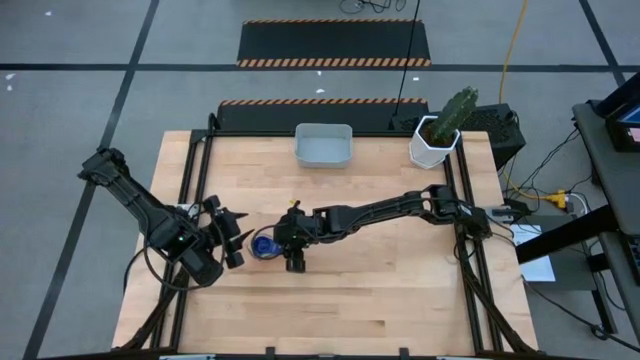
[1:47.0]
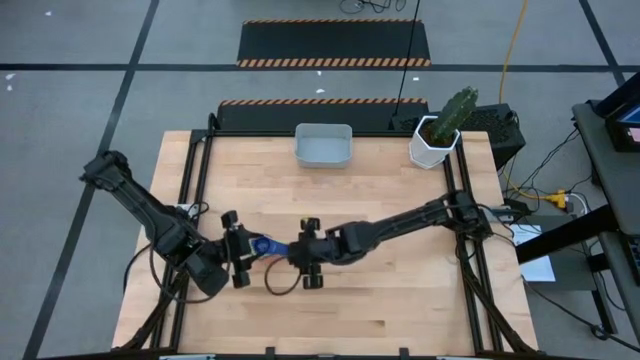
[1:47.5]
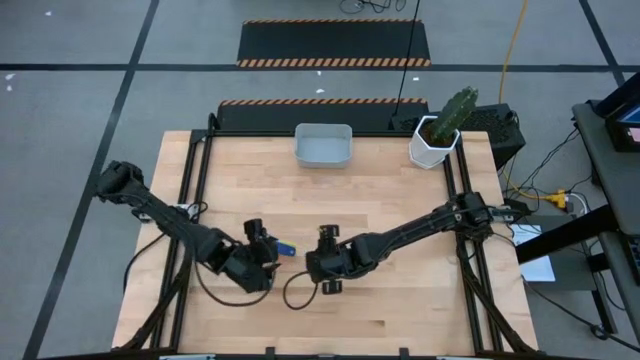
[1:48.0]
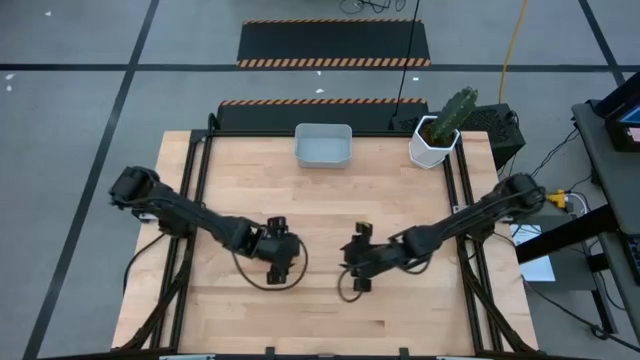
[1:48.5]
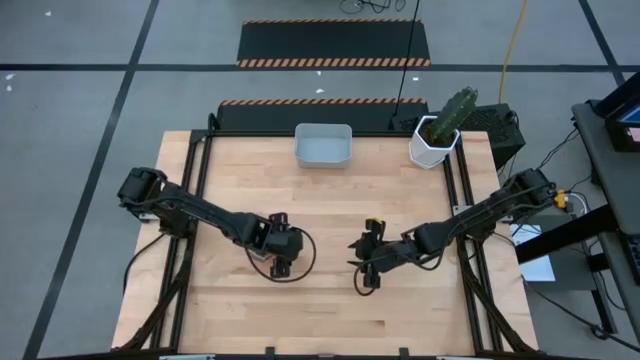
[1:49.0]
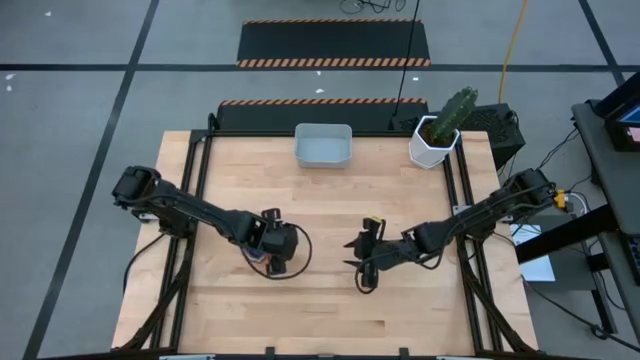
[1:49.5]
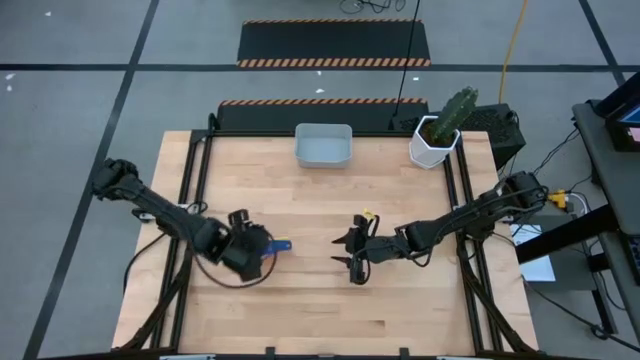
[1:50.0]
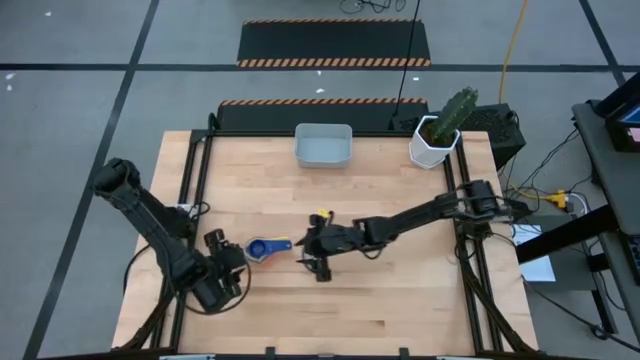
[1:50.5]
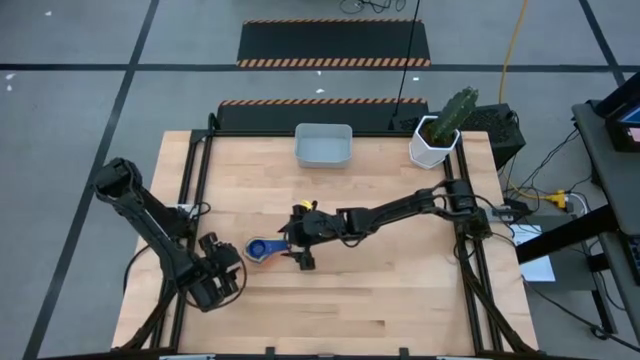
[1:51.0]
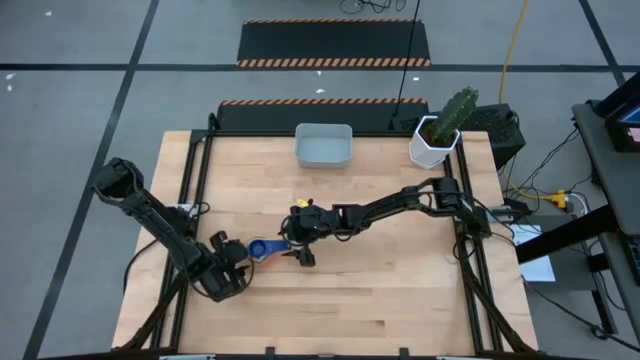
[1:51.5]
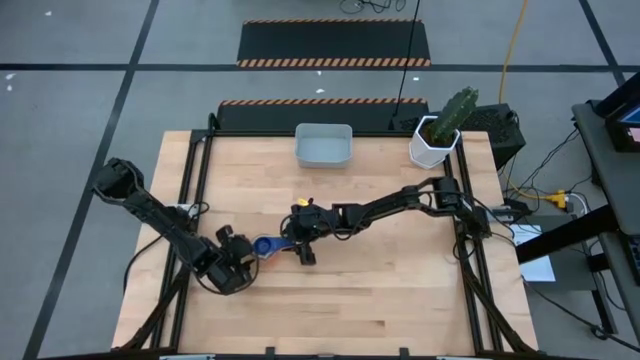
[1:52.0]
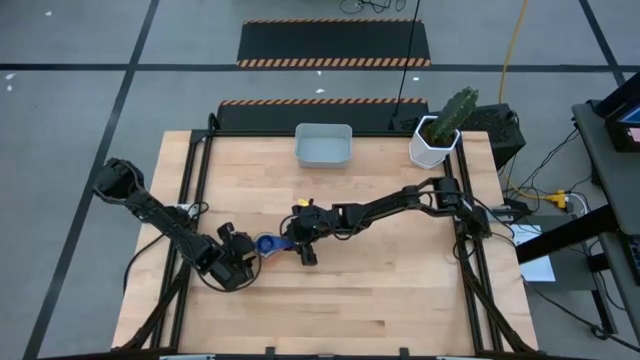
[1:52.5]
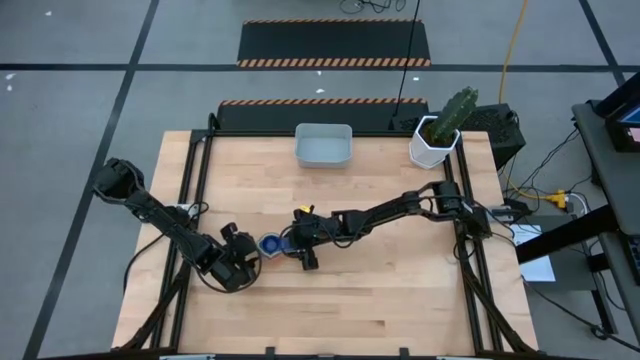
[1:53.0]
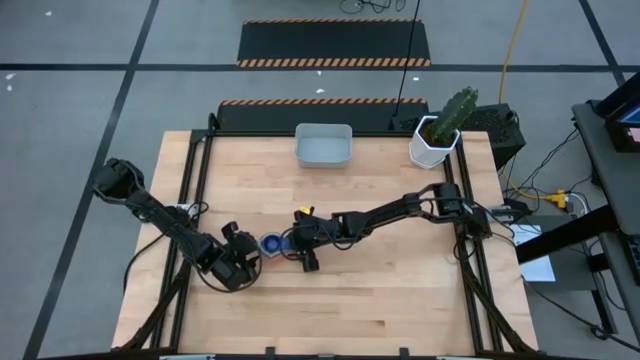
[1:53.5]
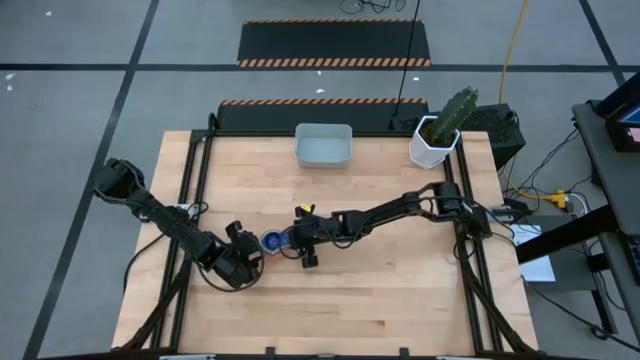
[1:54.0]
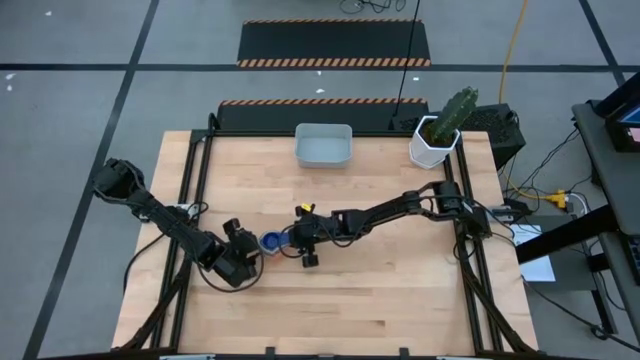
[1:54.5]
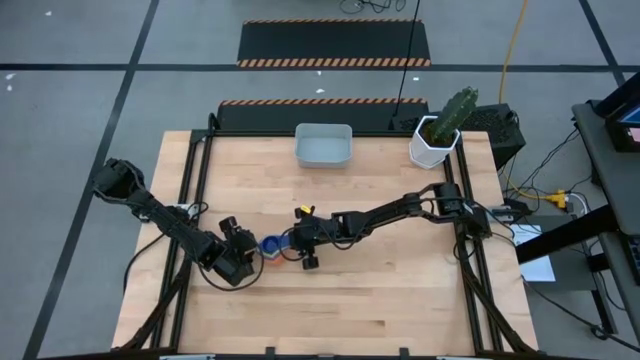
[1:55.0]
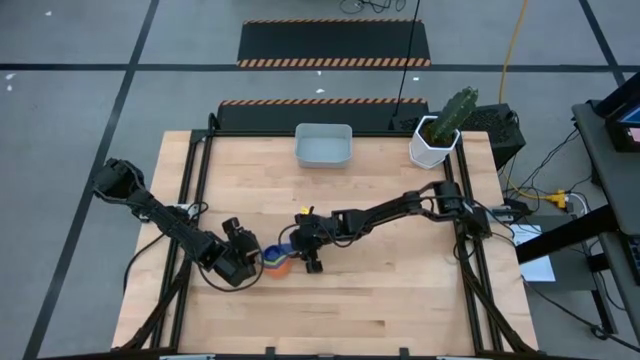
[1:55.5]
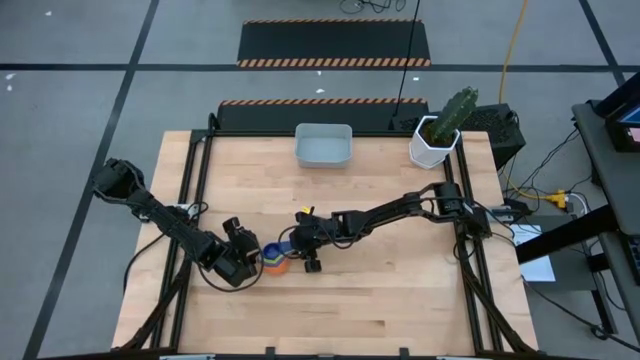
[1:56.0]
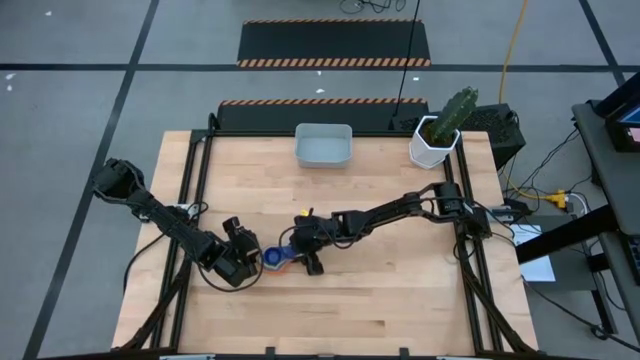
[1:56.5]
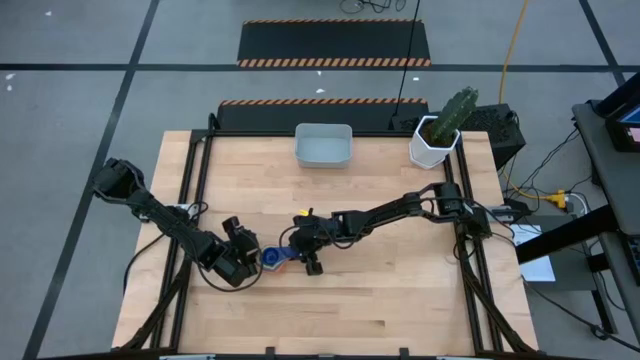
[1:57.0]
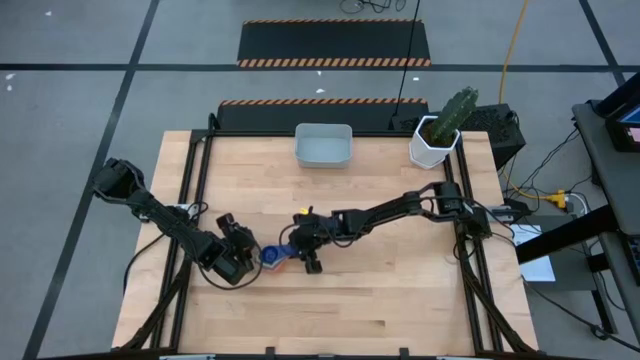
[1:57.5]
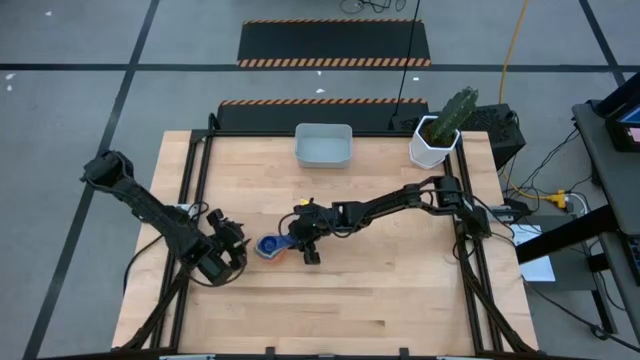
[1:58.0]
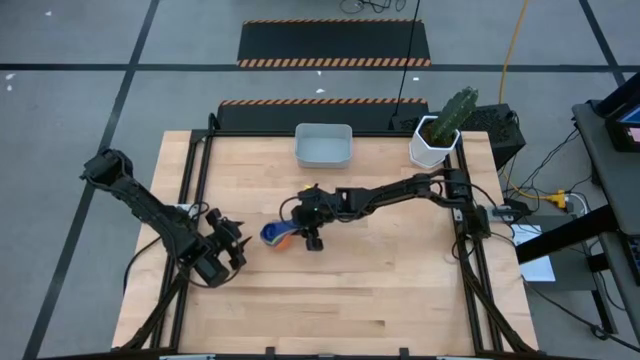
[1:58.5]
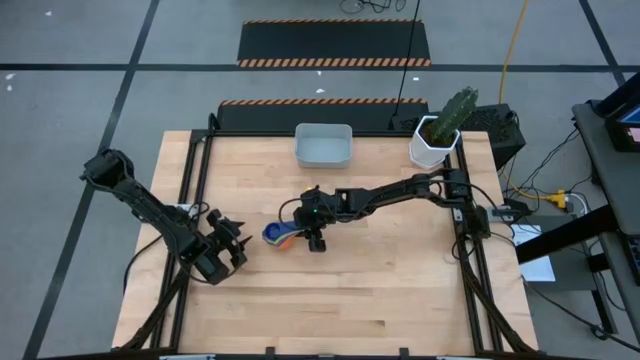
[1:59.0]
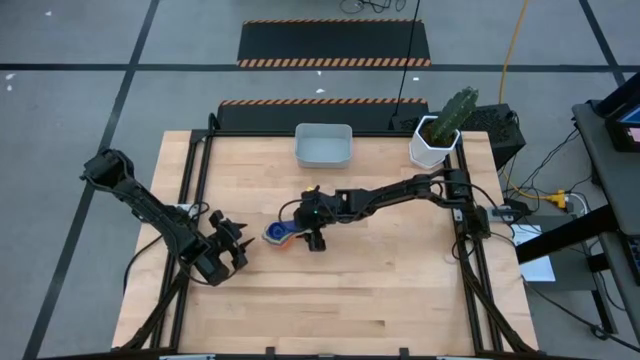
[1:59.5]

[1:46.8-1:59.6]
Task: Nest measuring cups in basket
Put the nested measuring cups into the gray bin

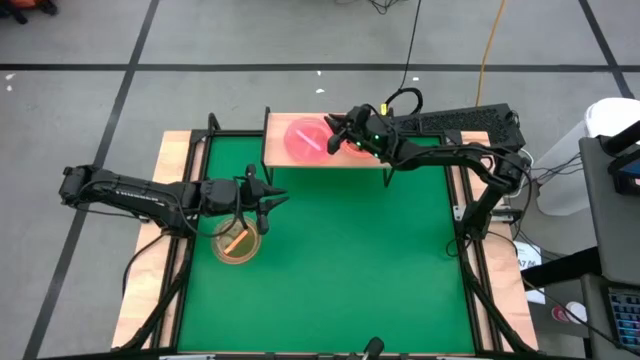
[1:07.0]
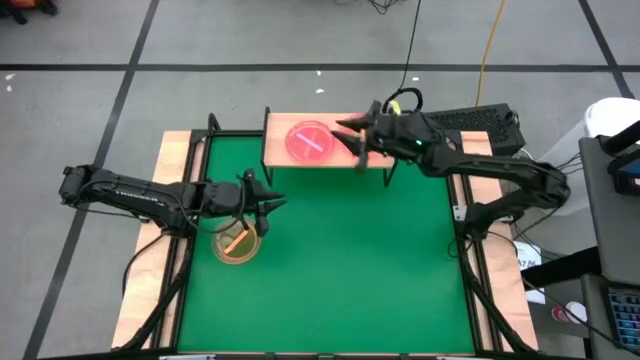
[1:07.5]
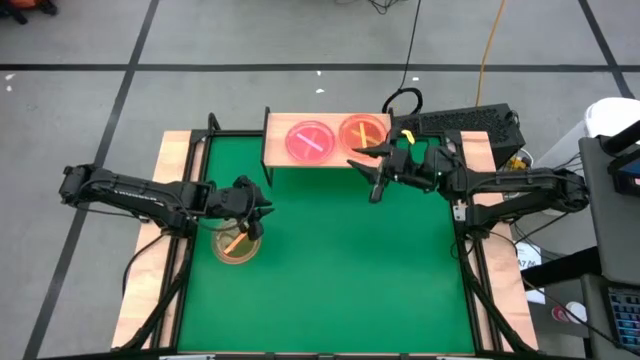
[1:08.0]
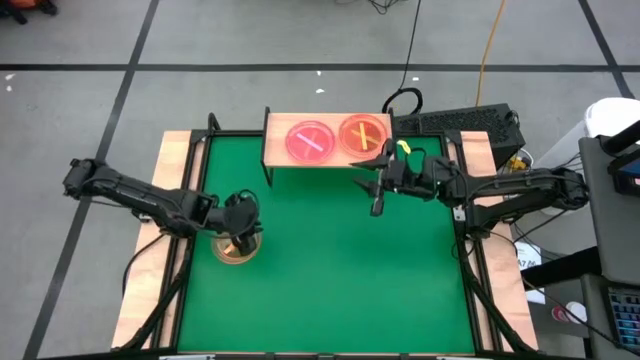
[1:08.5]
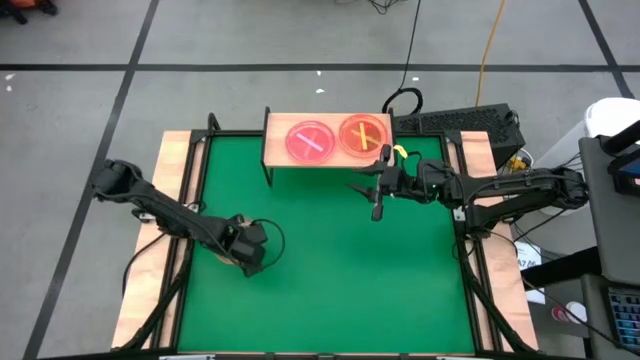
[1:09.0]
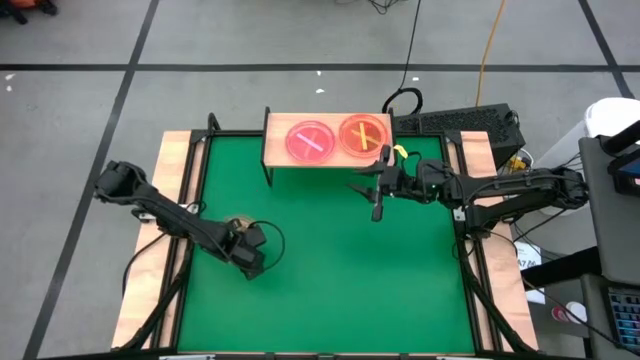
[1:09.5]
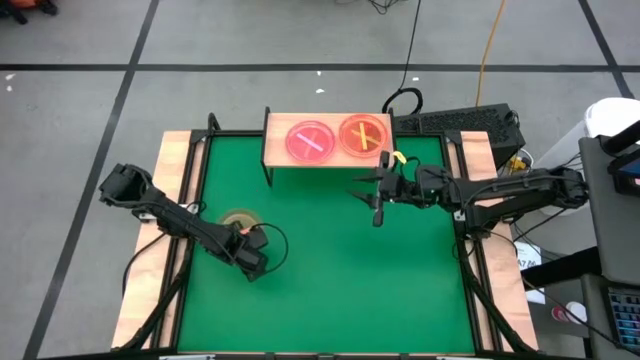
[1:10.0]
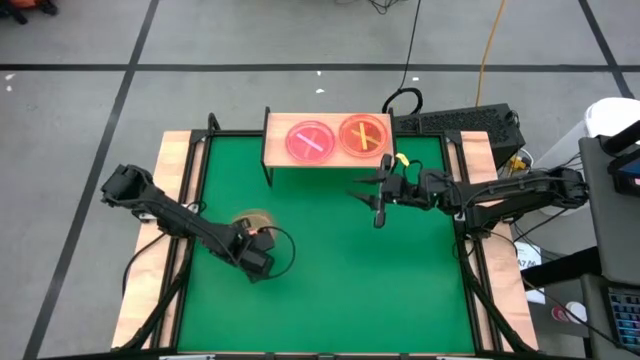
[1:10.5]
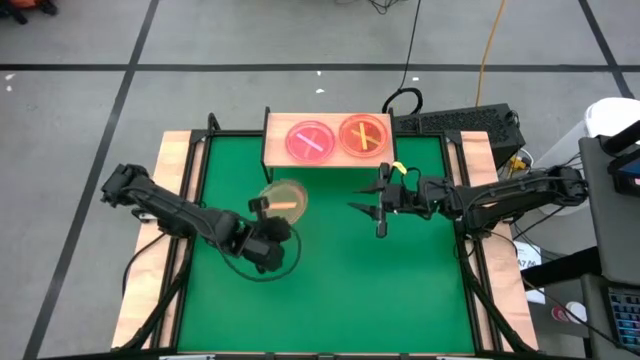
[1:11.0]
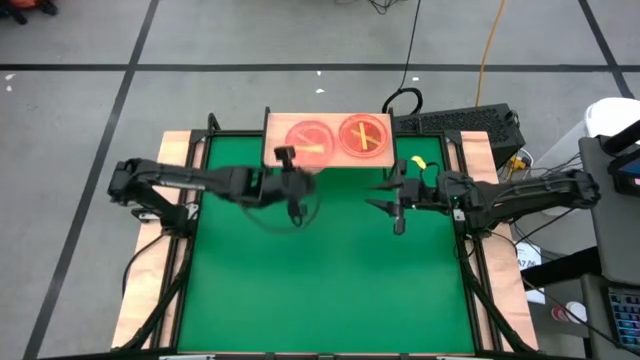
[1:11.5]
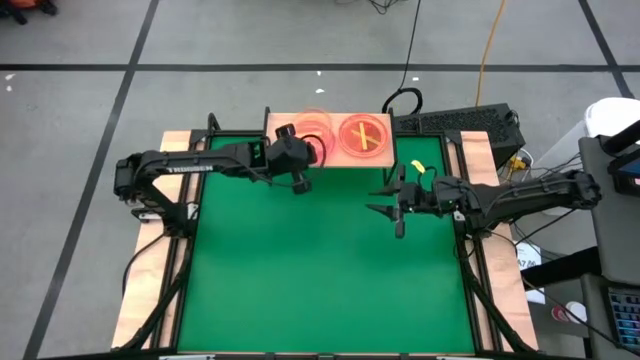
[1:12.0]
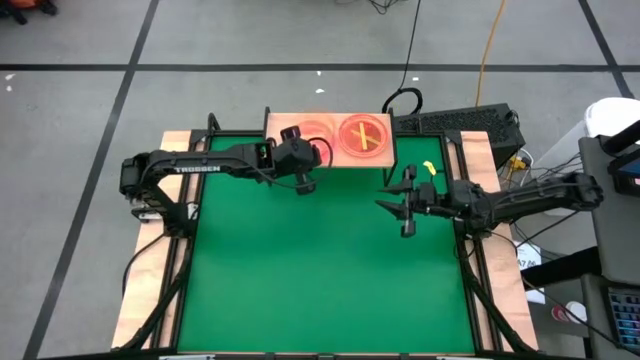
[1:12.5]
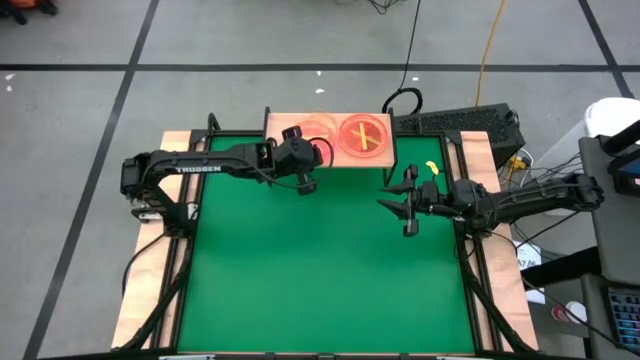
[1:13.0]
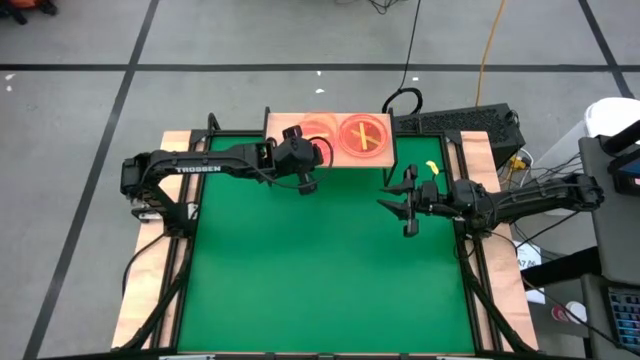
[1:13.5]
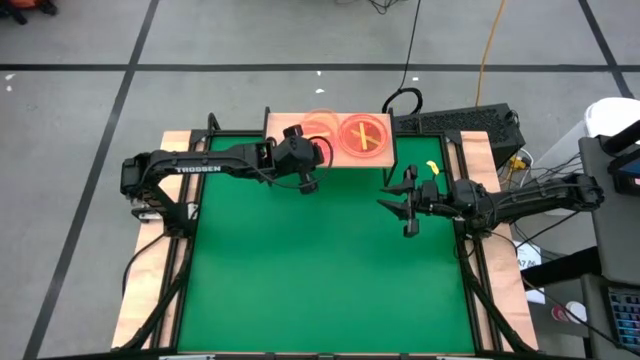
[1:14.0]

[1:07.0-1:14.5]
Task: Place and stack plates onto a shelf
Stack the orange plate on top of the pink plate on the shelf

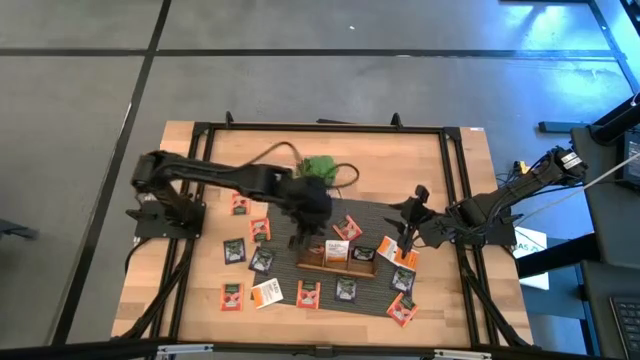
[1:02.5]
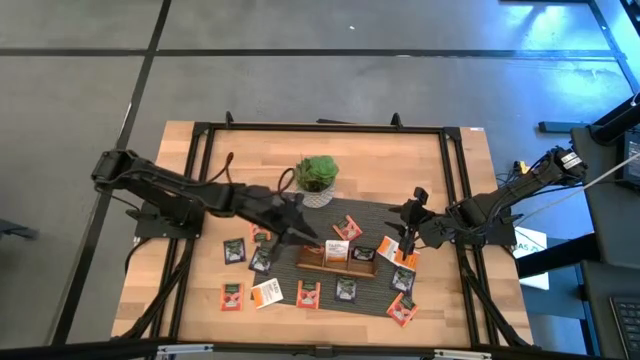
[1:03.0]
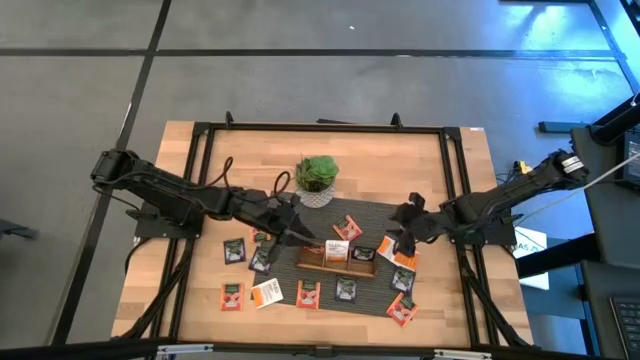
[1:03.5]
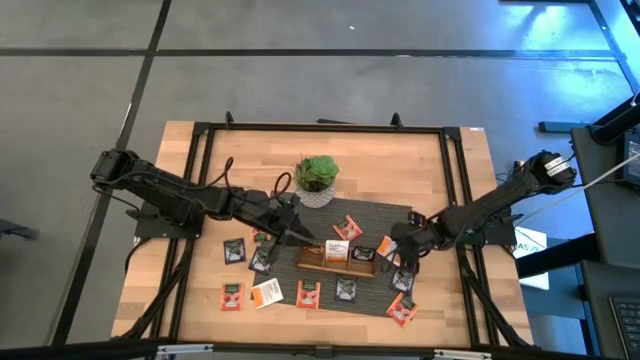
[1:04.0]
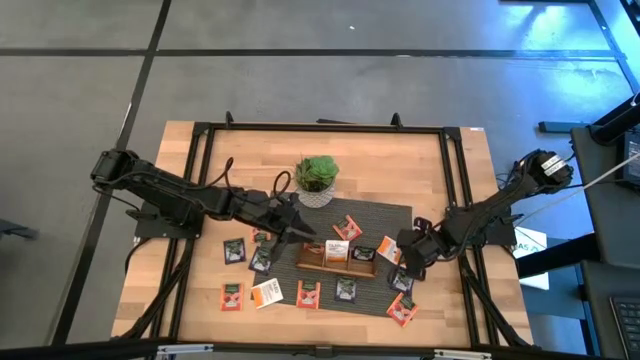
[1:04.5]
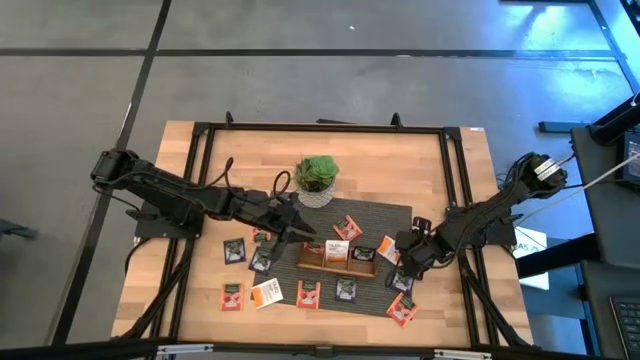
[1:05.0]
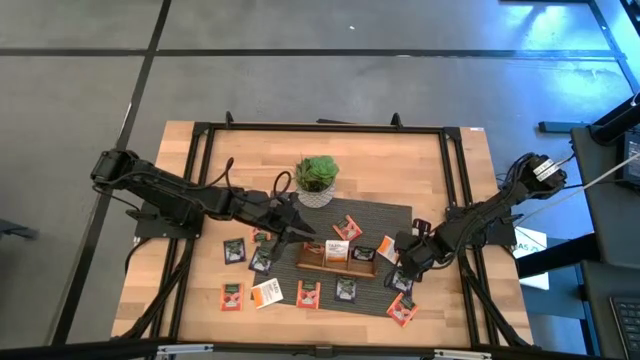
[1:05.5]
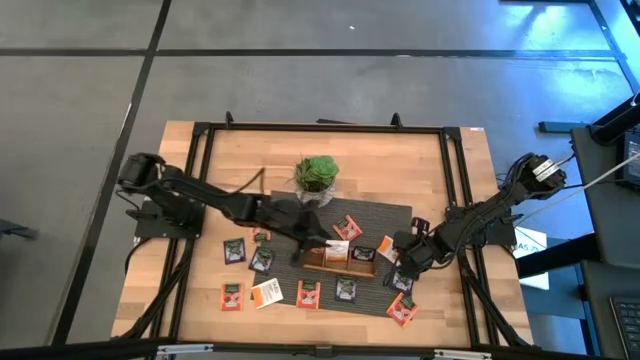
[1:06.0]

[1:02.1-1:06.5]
Task: Pick & Place Tea
Put the white tea bag into the middle of the wooden organizer
